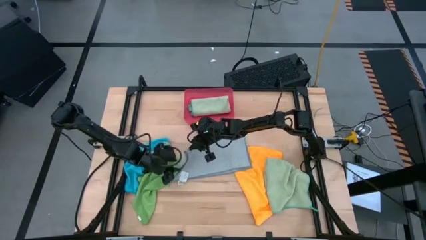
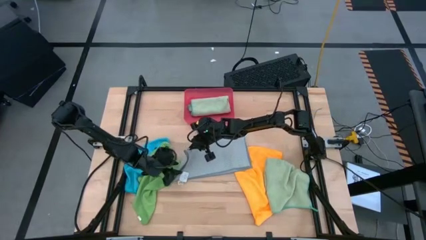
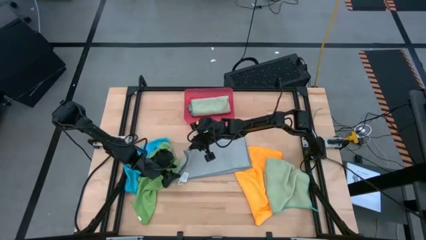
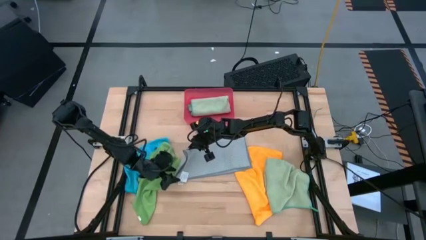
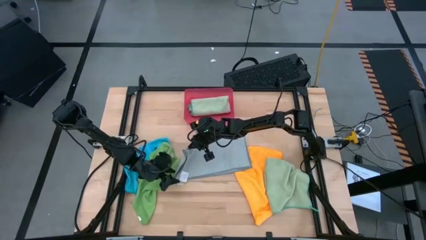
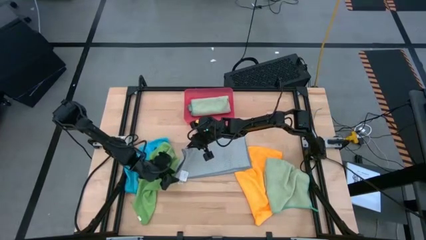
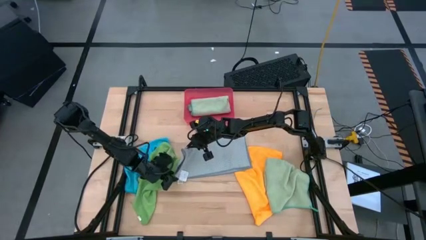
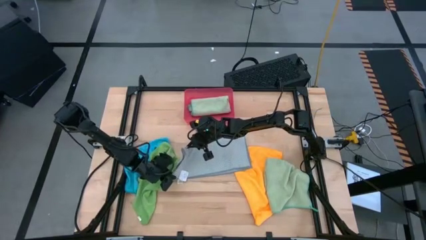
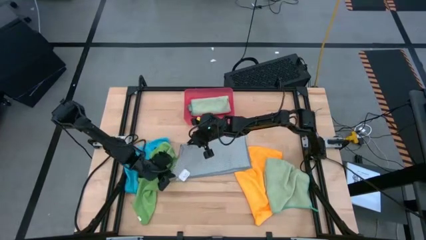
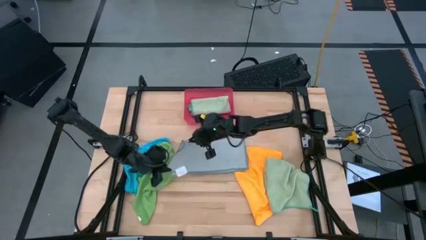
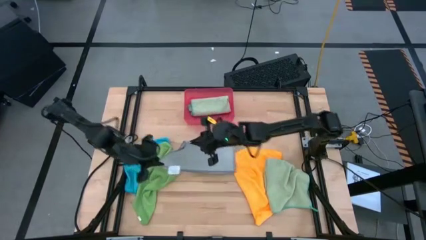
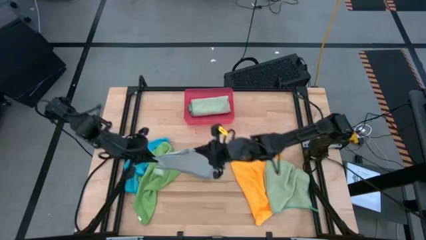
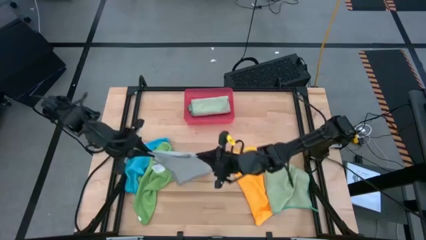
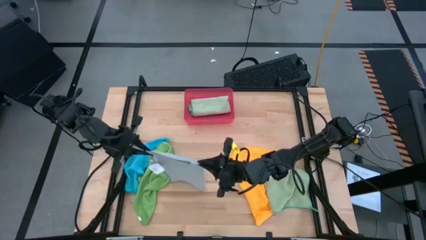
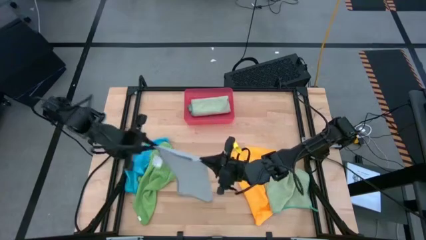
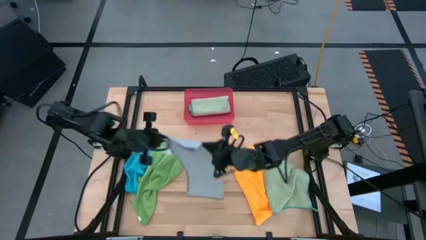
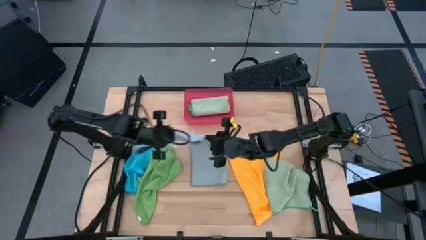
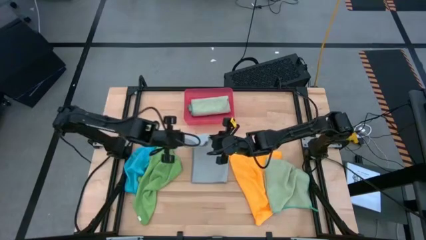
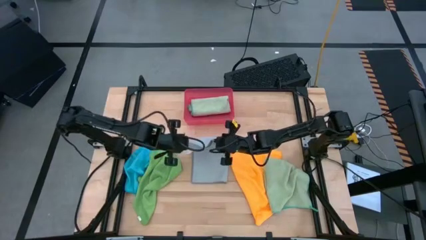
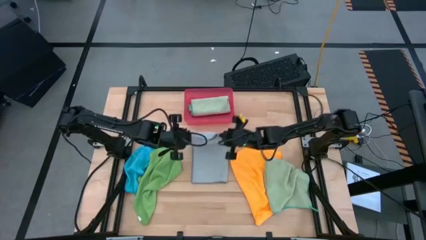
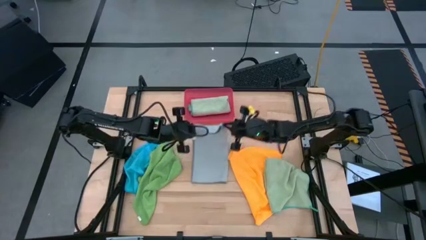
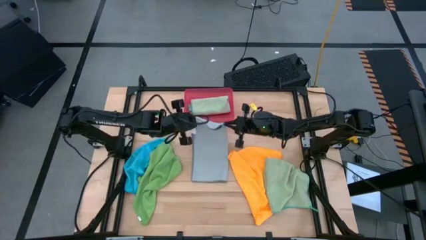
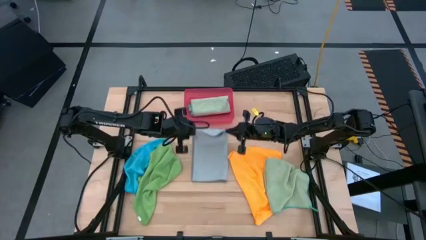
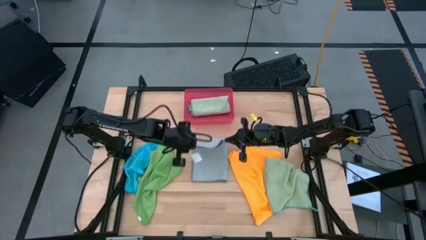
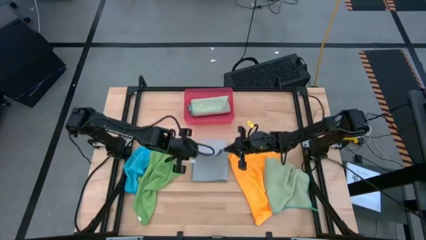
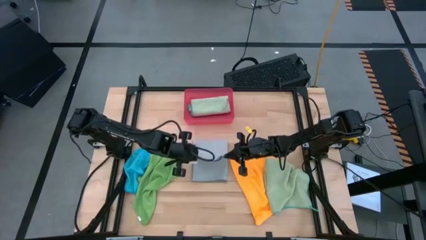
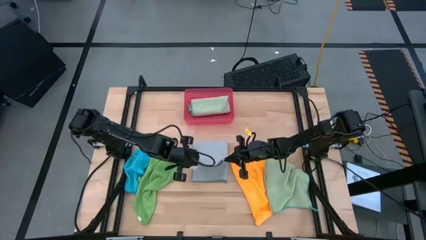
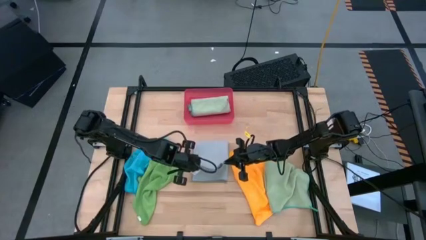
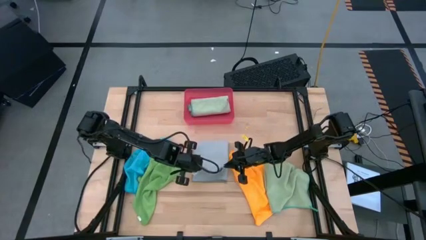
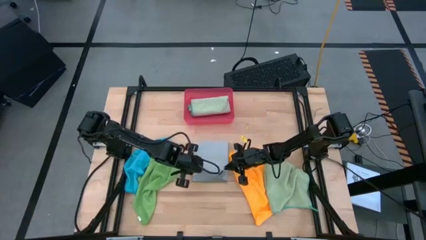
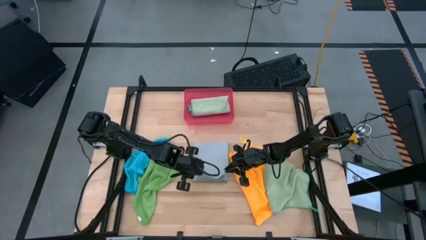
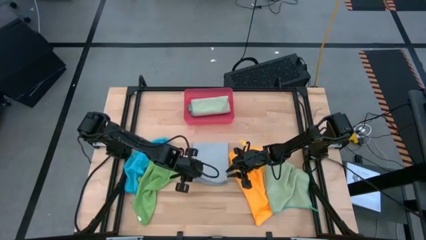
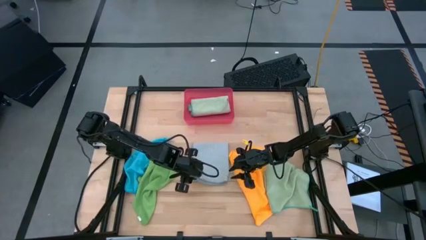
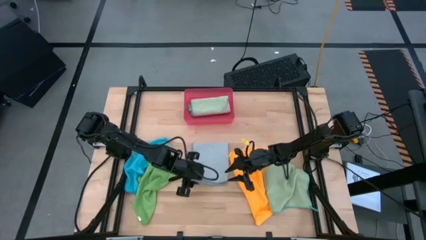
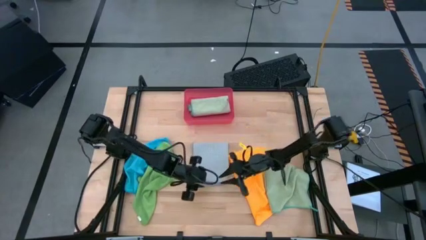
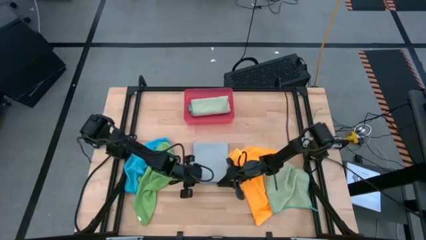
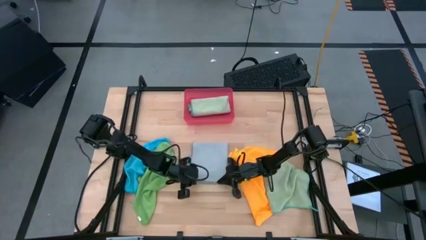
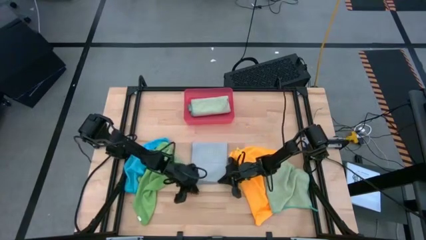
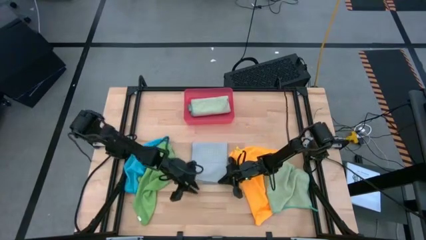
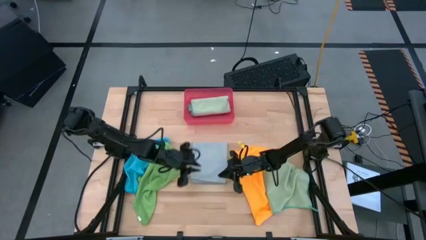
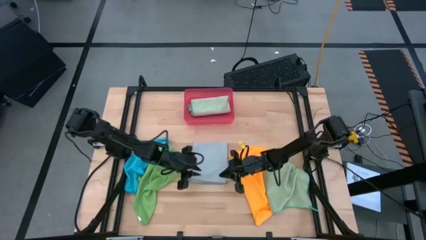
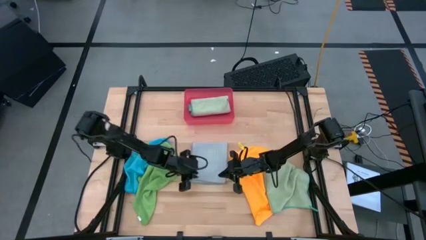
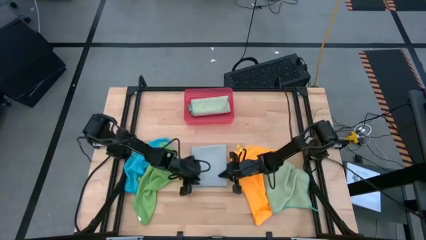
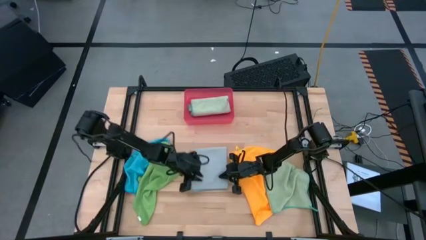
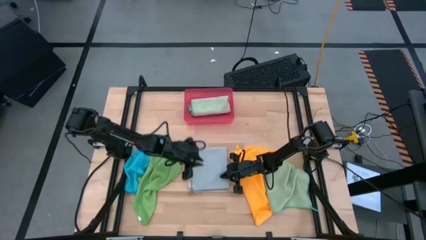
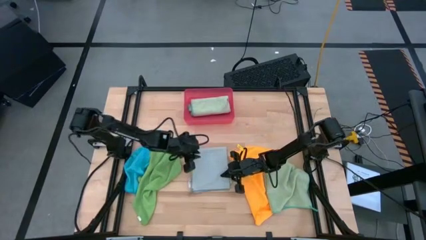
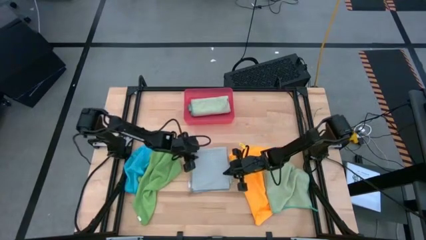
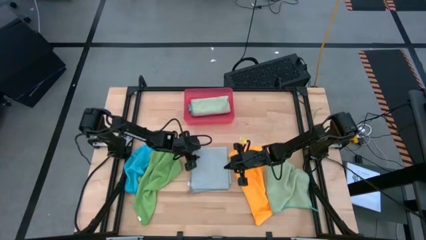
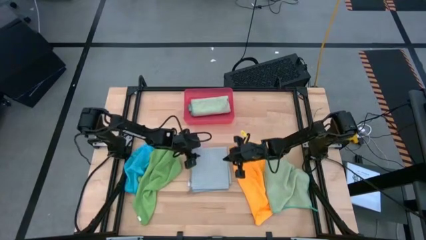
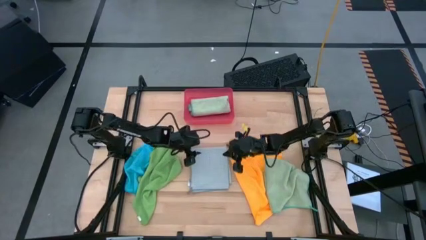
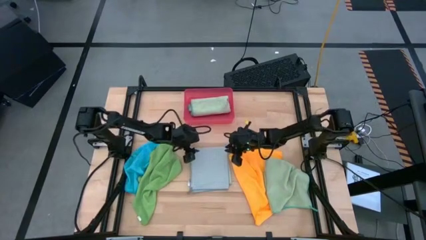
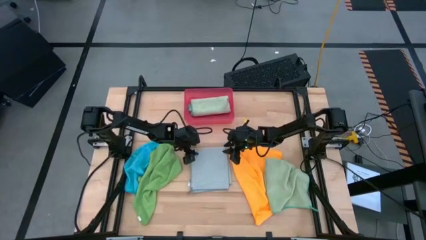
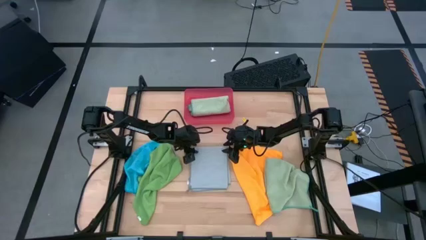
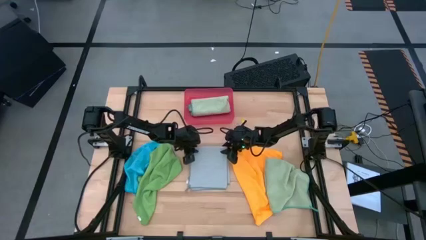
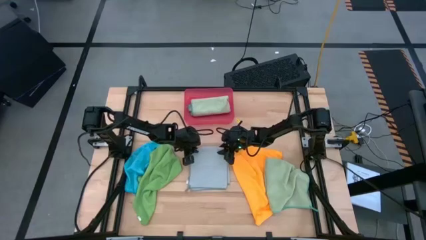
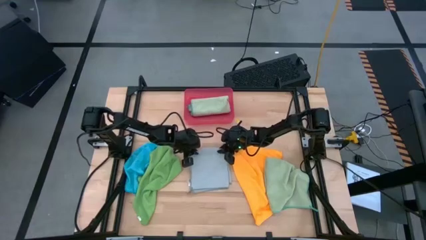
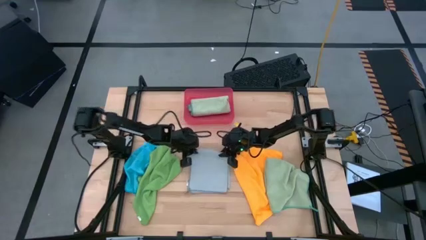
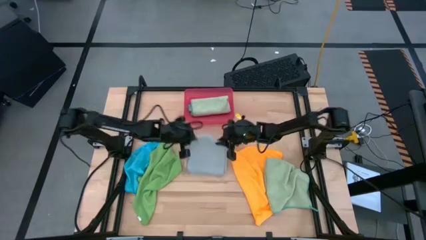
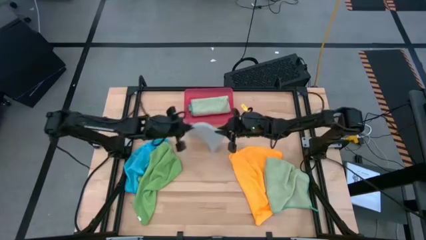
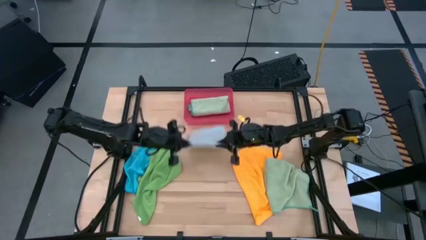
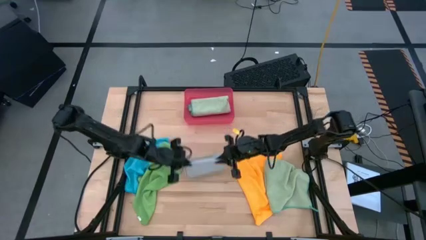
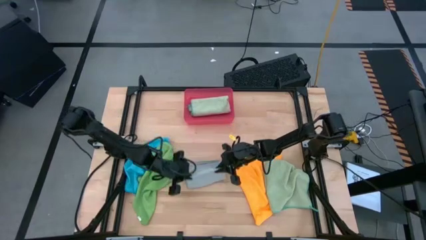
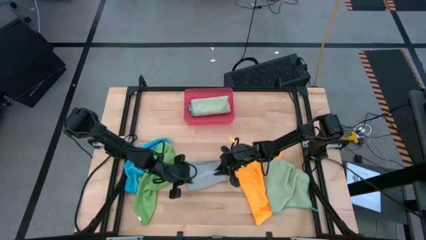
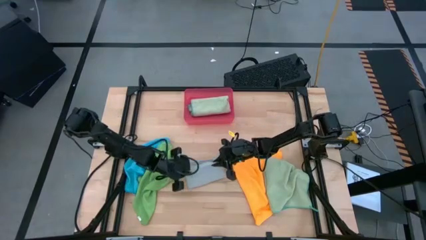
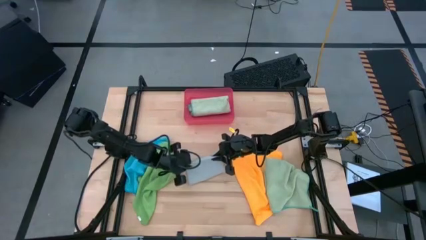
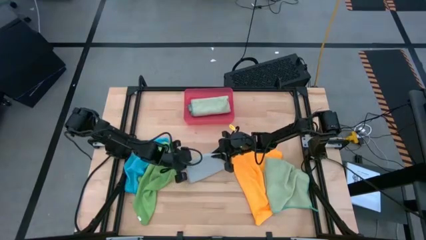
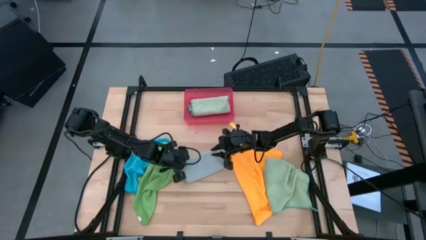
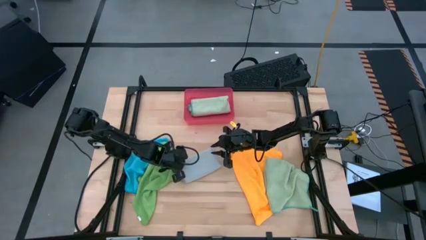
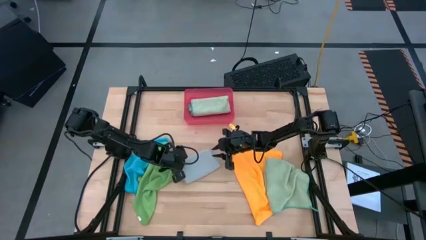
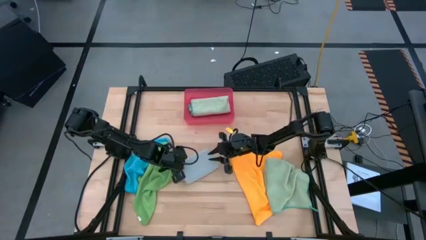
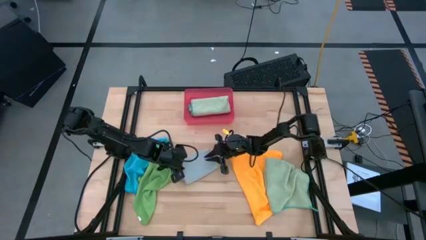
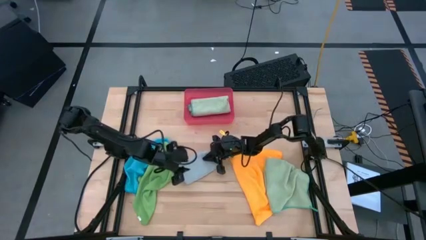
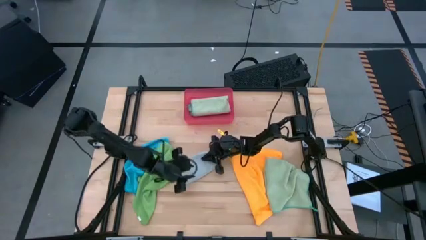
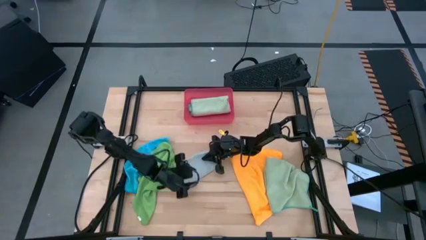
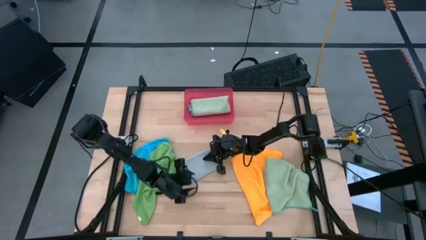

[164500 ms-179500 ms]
Task: Fold microfiber towels
Fold the gray towel
